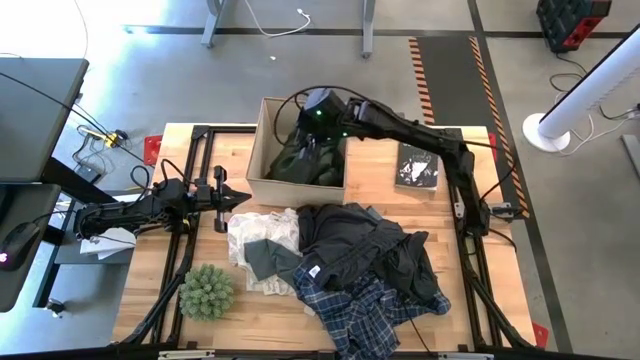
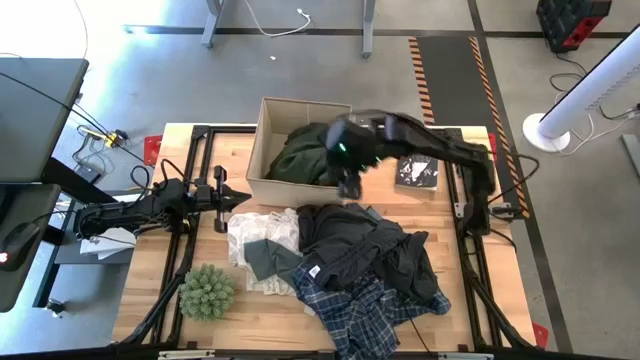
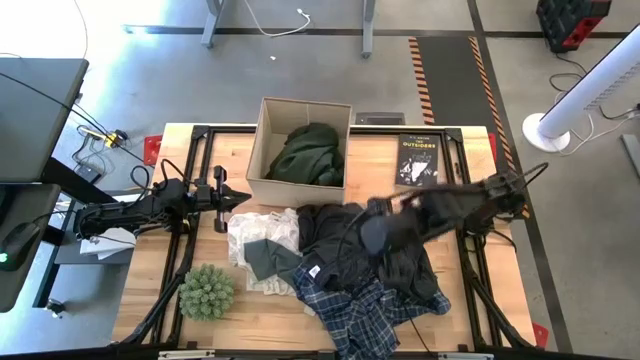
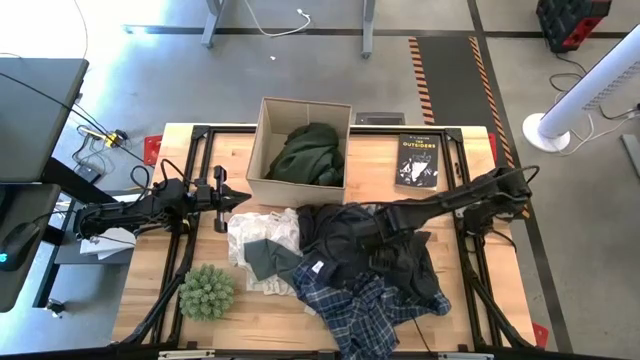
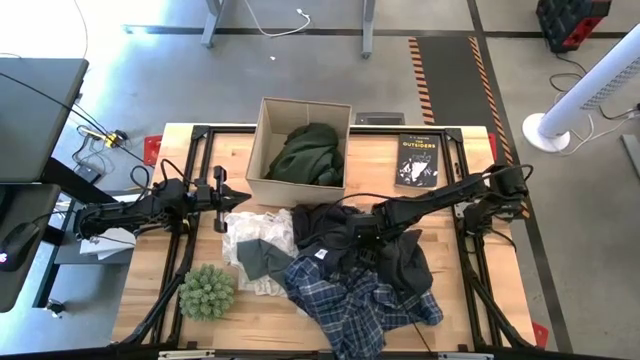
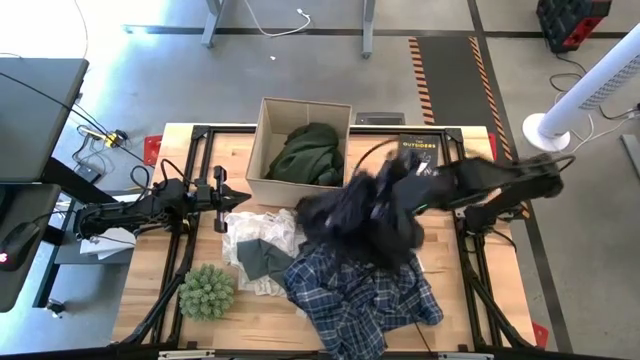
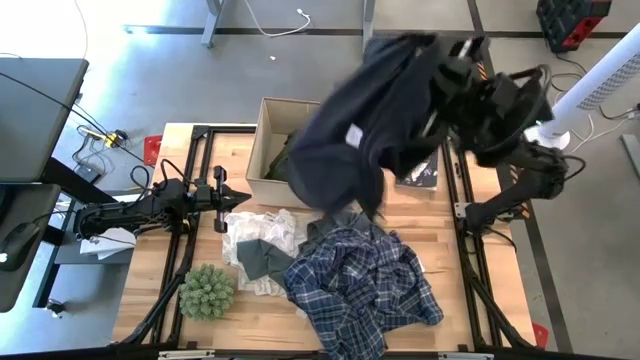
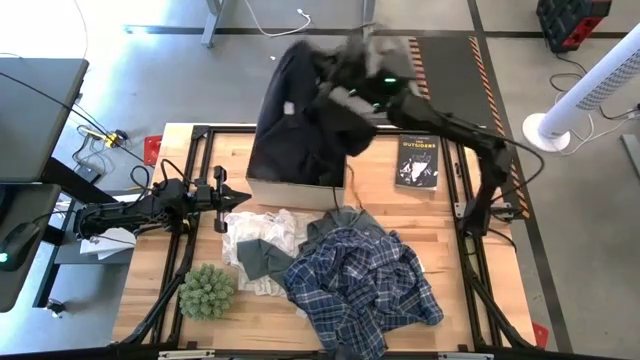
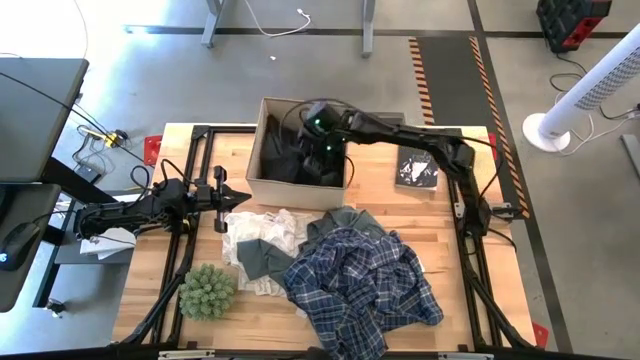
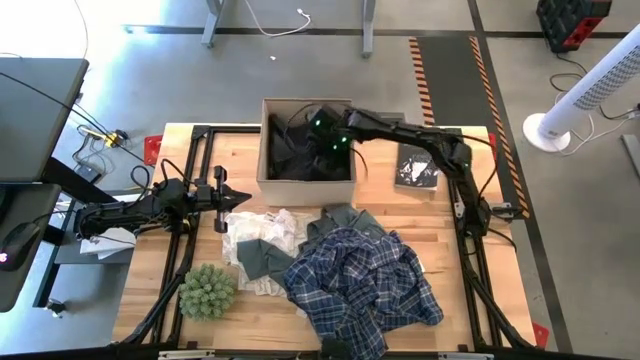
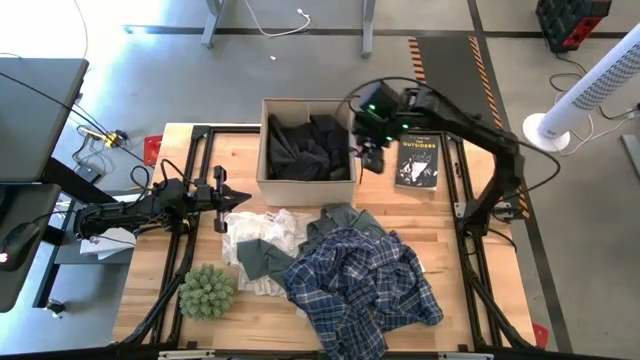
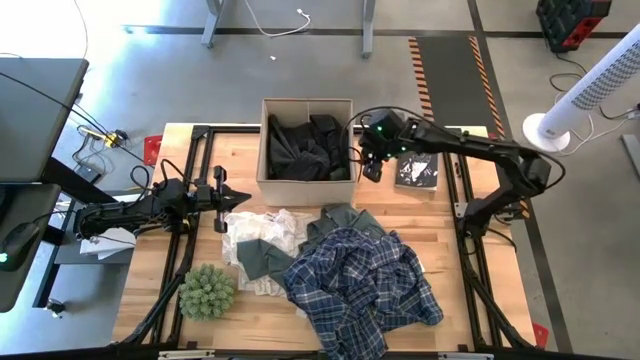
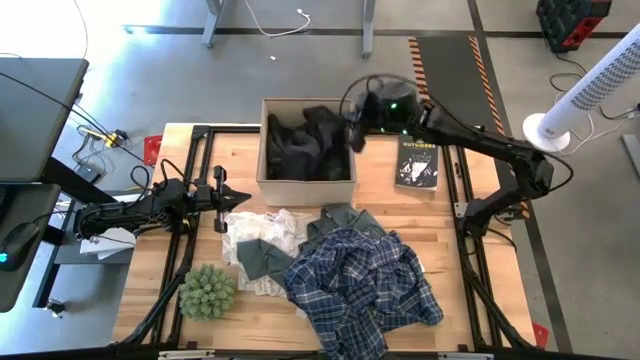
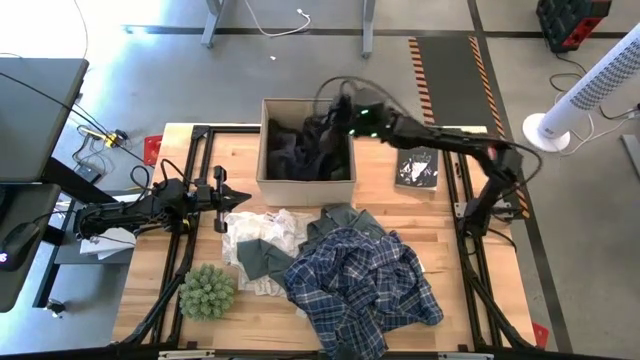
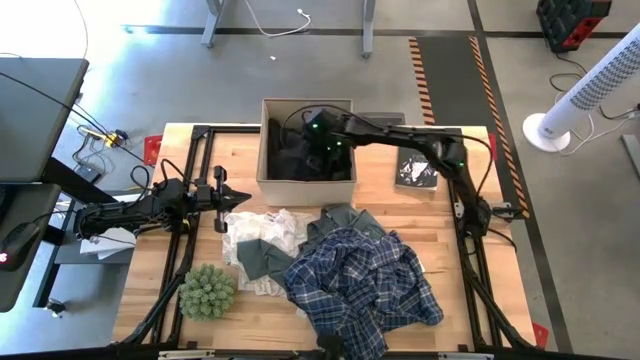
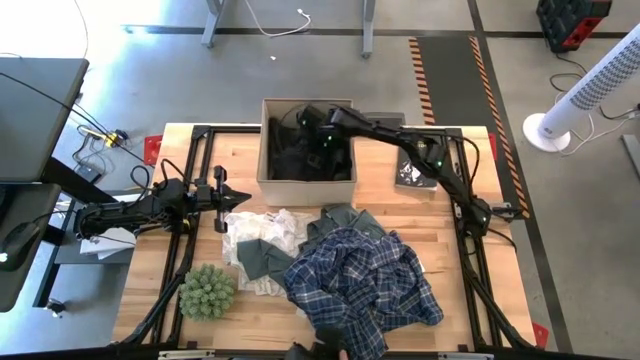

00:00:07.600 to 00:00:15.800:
Task: Sort clothes
Put the black shorts into the white bin

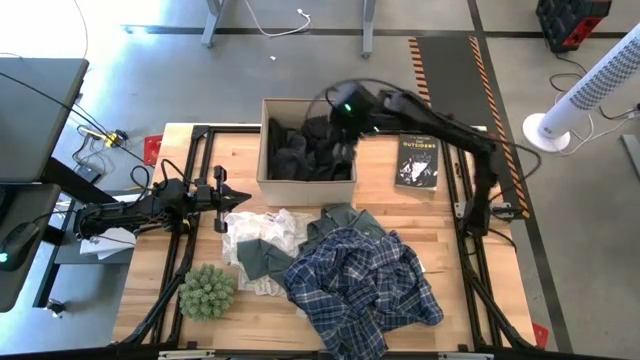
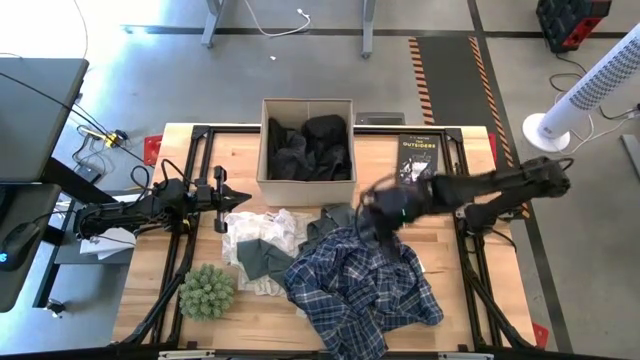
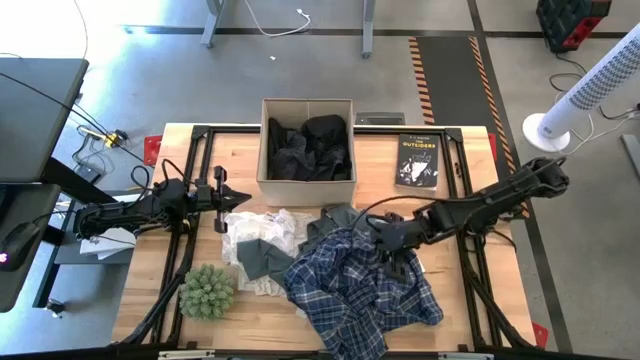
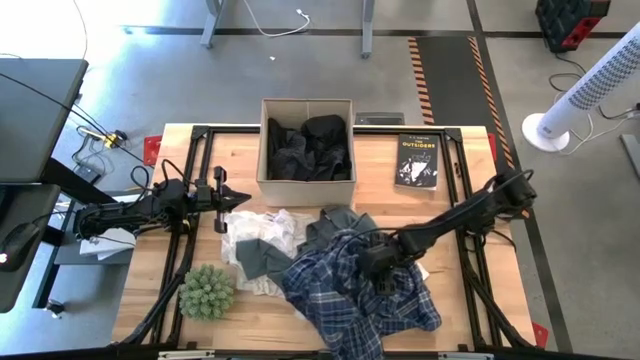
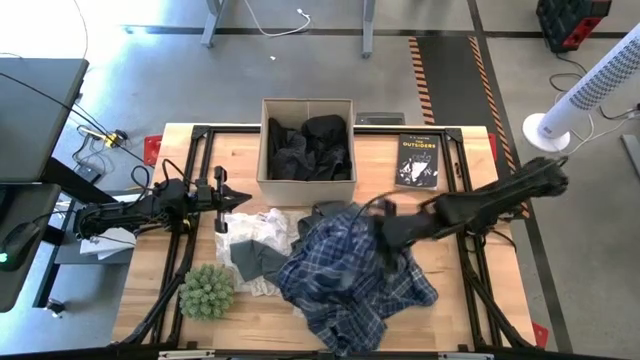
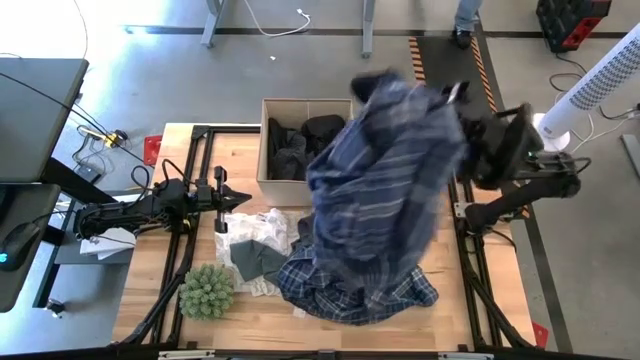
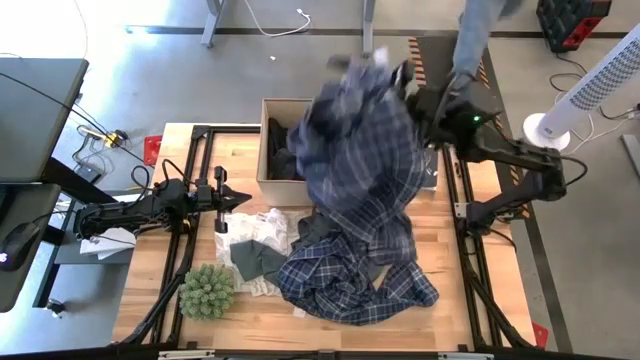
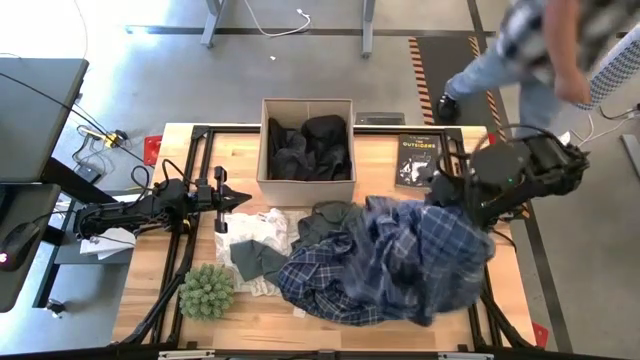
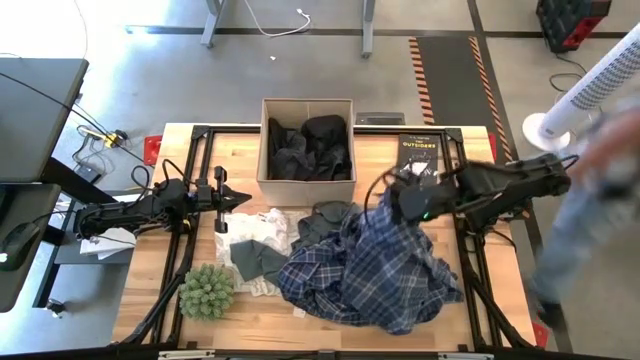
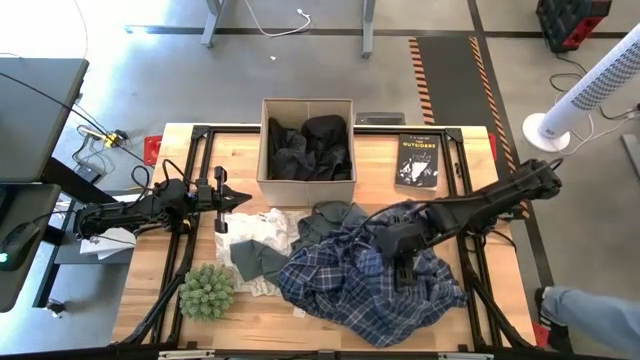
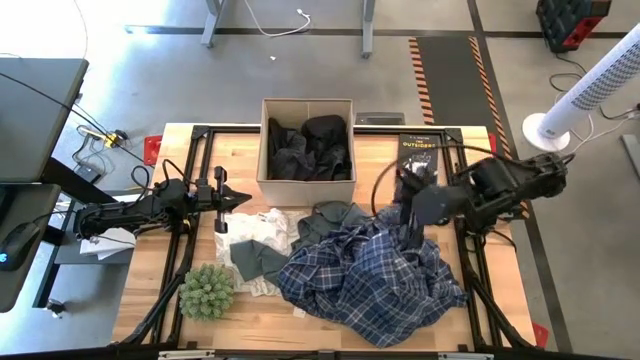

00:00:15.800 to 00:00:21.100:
Put the blue long sleeve polo into the white bin

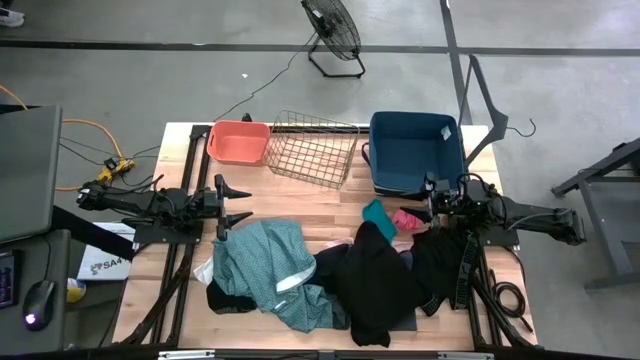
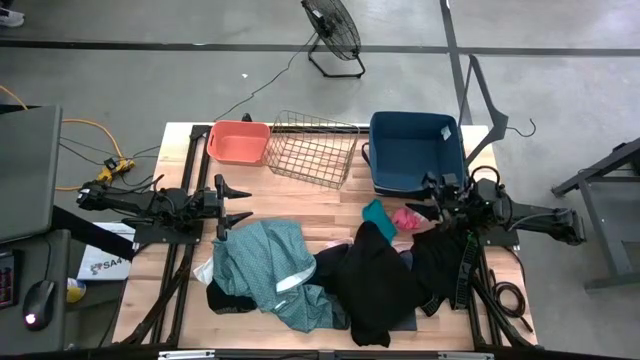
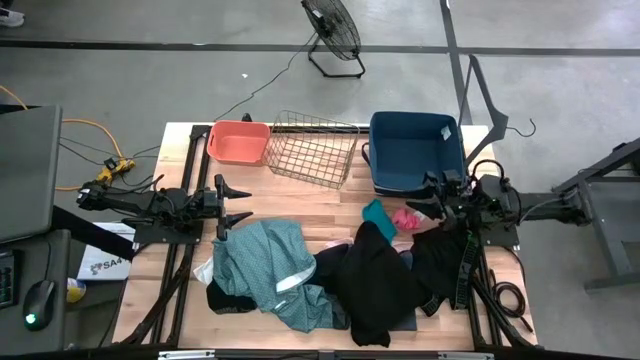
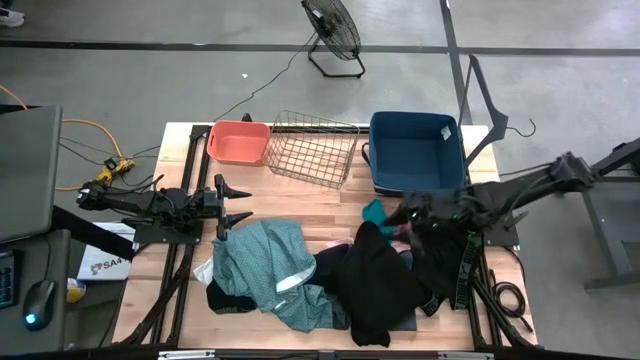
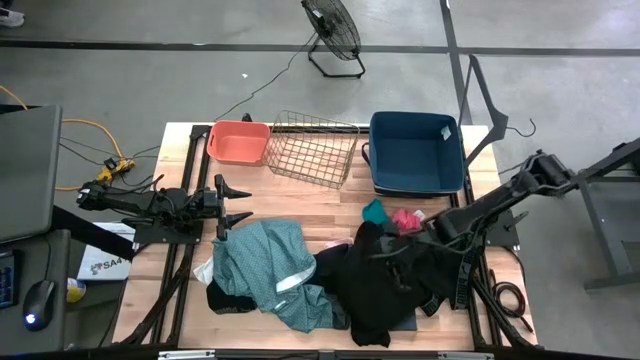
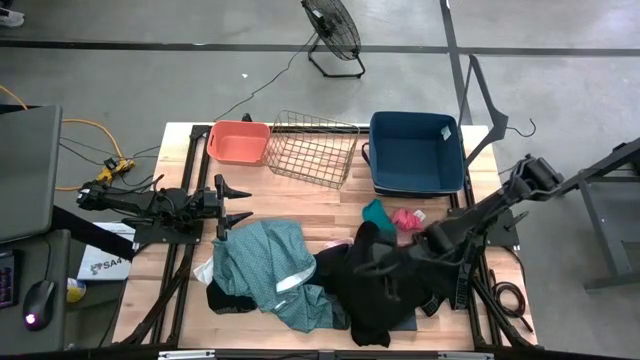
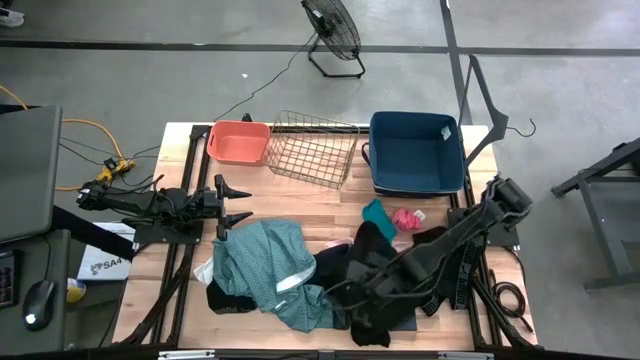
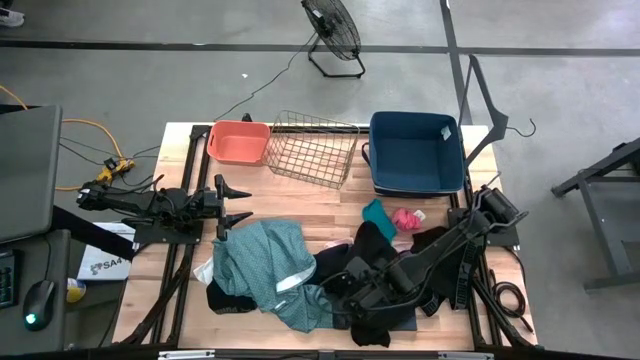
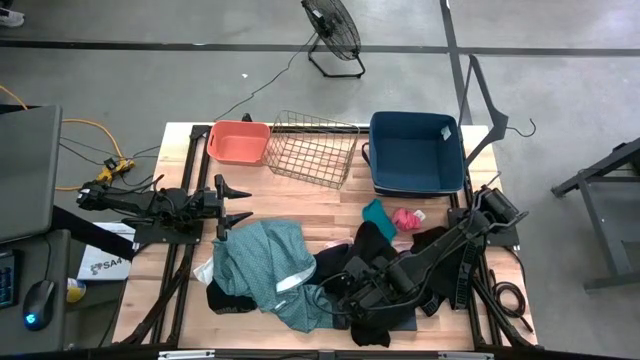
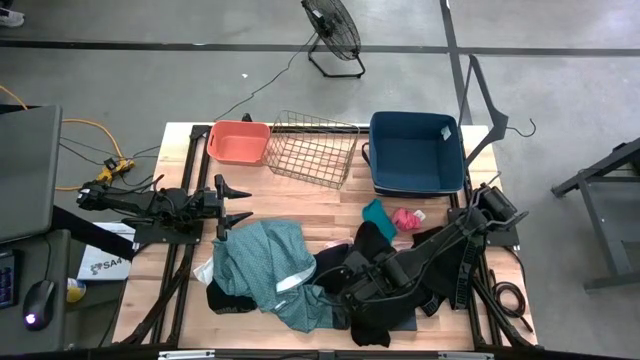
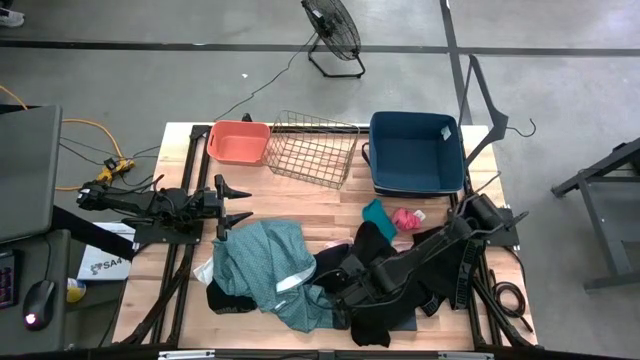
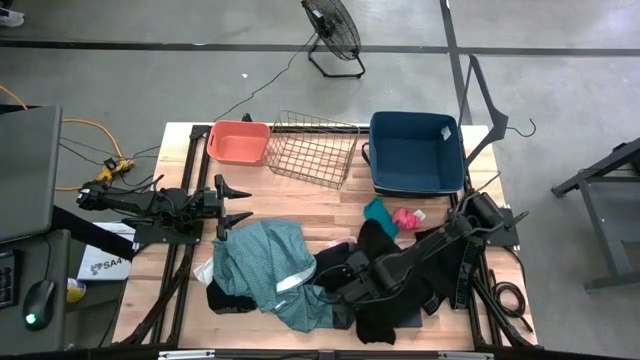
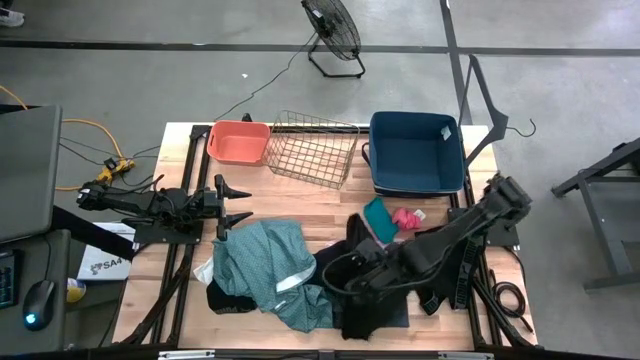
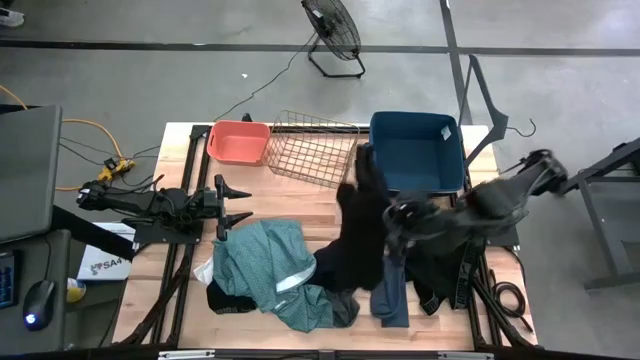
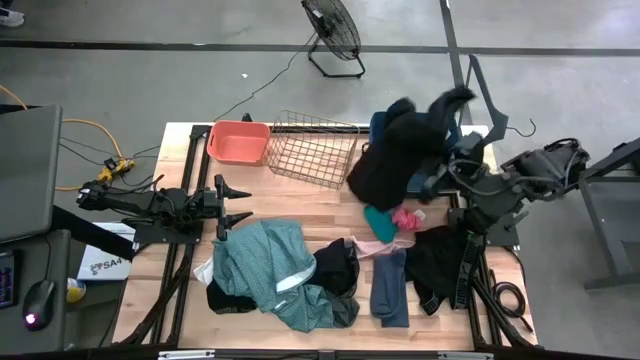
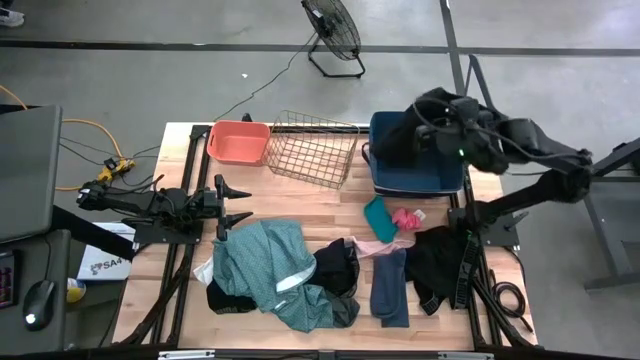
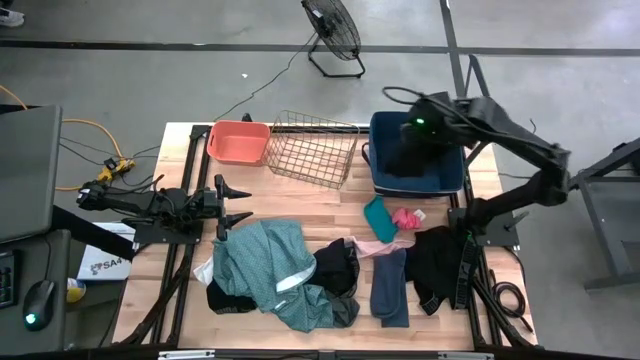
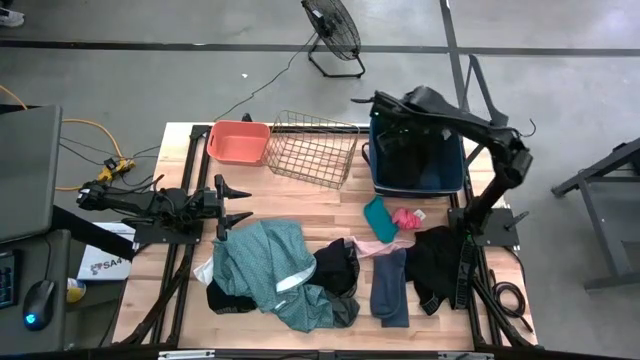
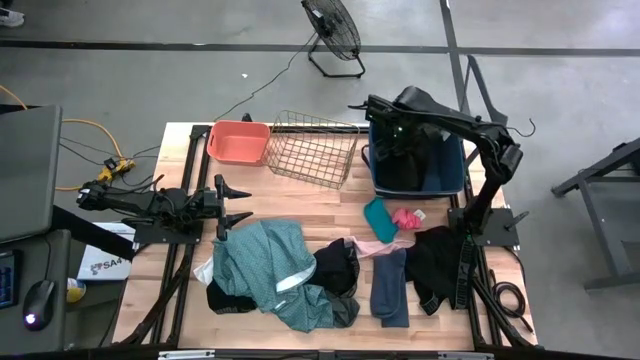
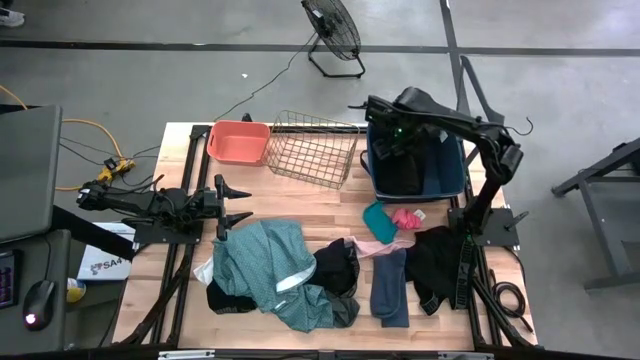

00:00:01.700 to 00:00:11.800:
Task: Pick & Place Cloths
Put the black shirt into the blue laundry organizer
